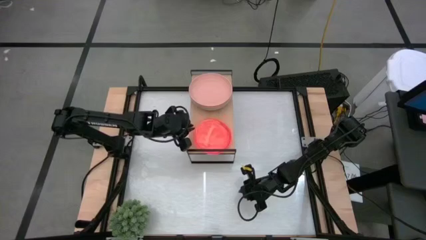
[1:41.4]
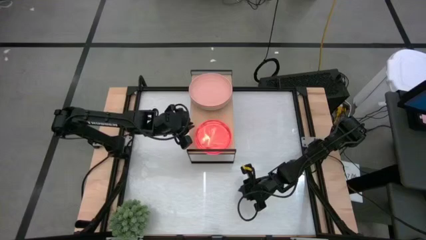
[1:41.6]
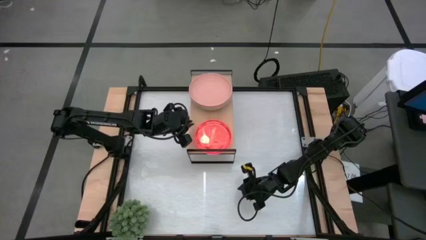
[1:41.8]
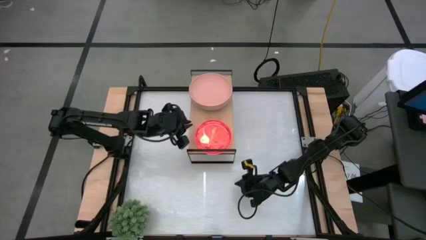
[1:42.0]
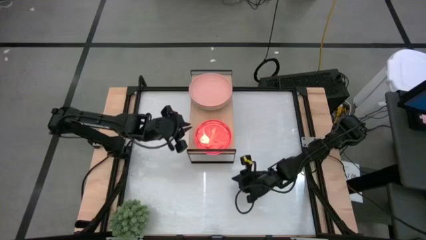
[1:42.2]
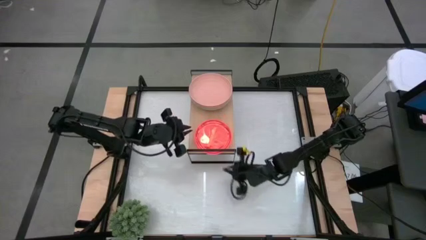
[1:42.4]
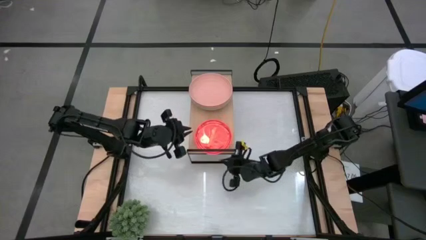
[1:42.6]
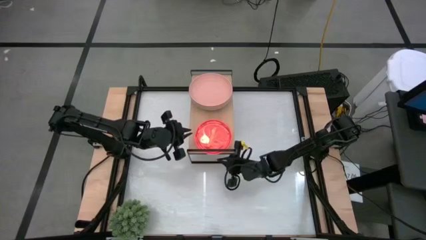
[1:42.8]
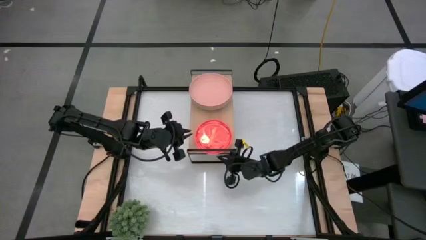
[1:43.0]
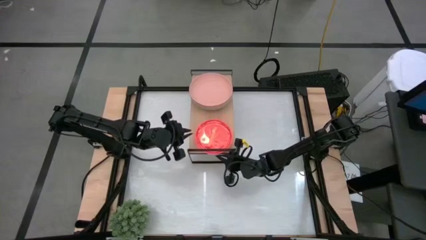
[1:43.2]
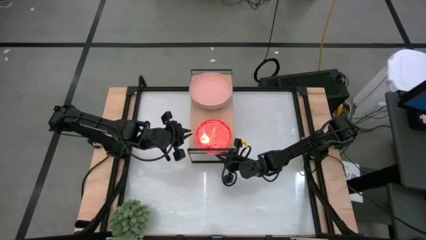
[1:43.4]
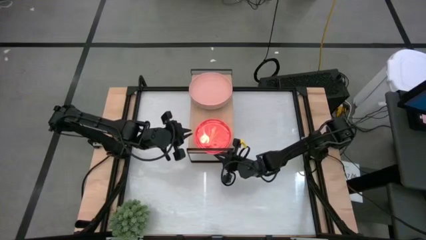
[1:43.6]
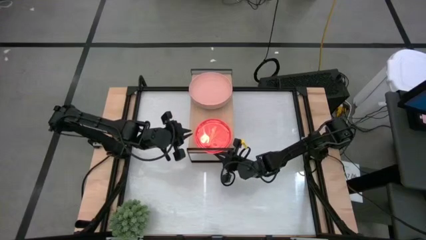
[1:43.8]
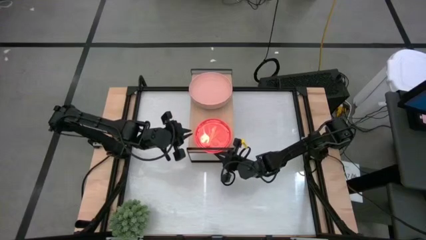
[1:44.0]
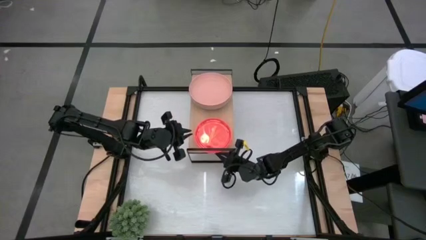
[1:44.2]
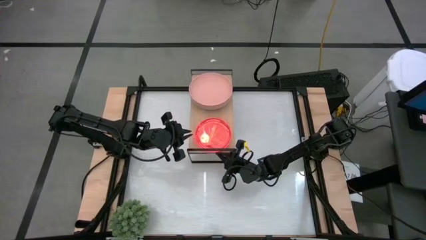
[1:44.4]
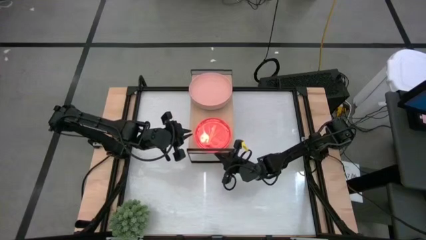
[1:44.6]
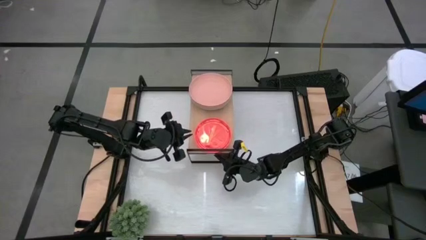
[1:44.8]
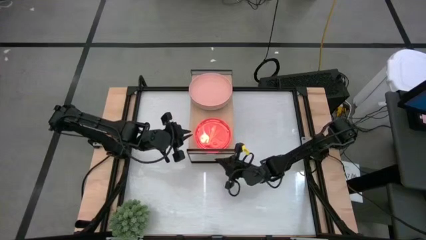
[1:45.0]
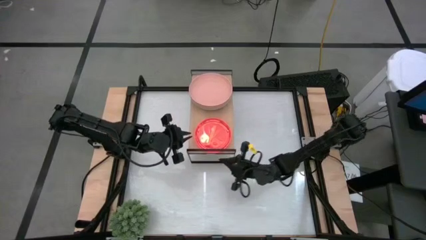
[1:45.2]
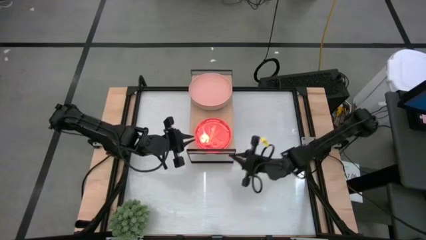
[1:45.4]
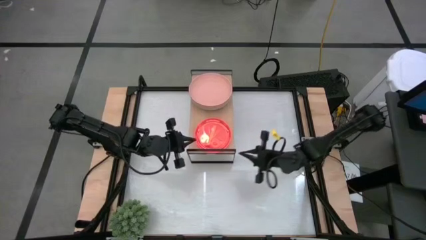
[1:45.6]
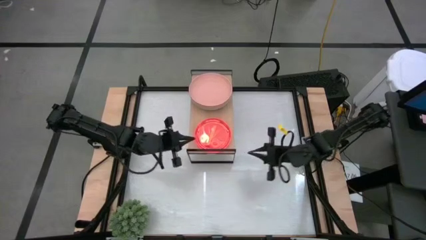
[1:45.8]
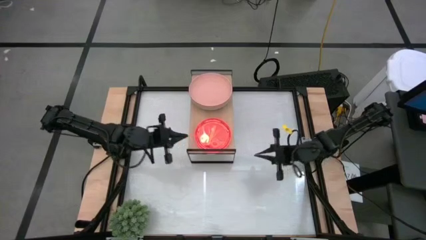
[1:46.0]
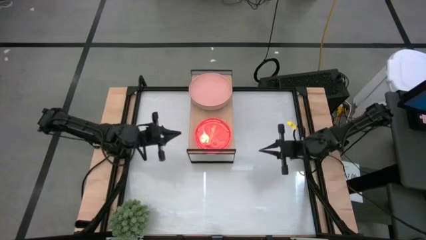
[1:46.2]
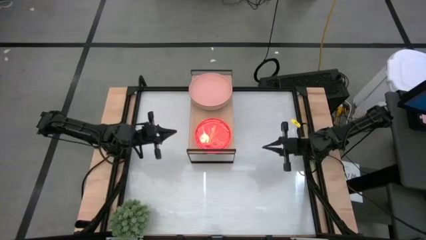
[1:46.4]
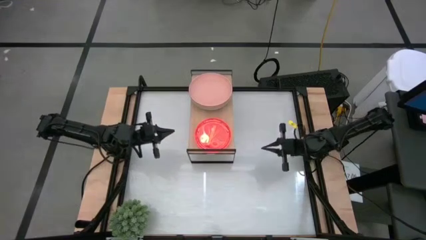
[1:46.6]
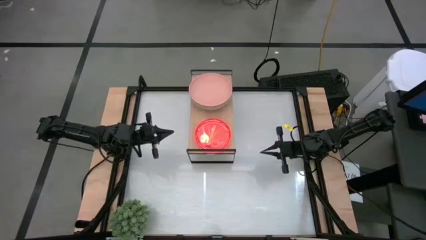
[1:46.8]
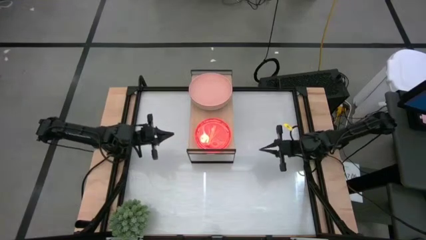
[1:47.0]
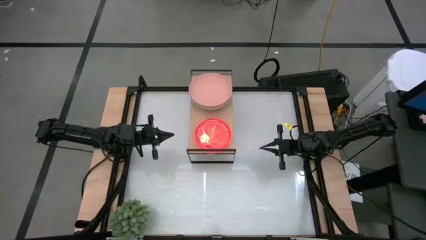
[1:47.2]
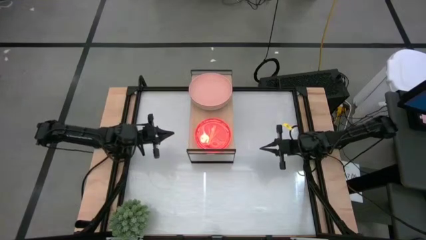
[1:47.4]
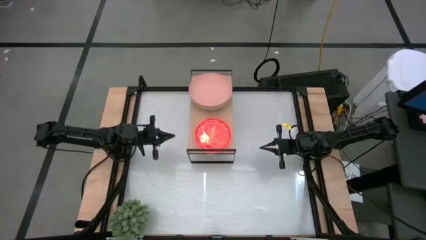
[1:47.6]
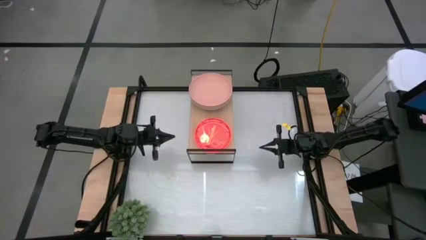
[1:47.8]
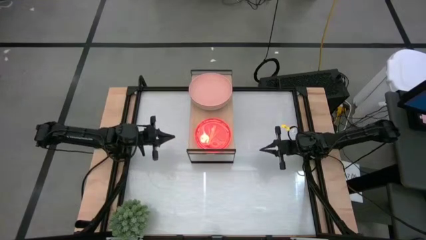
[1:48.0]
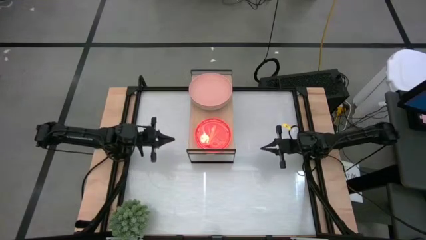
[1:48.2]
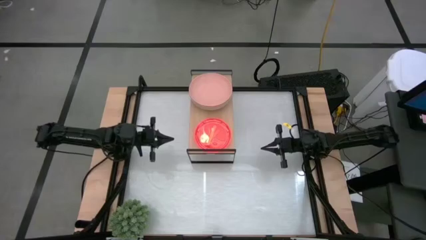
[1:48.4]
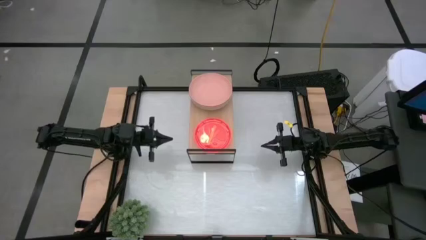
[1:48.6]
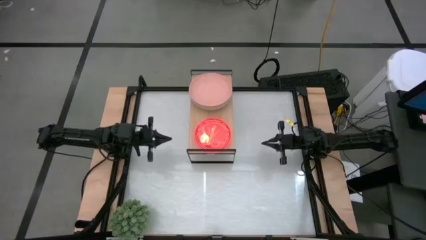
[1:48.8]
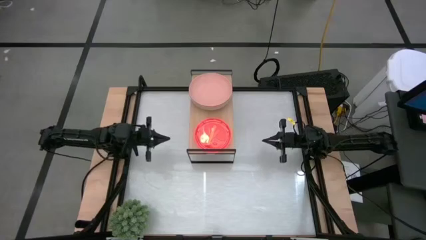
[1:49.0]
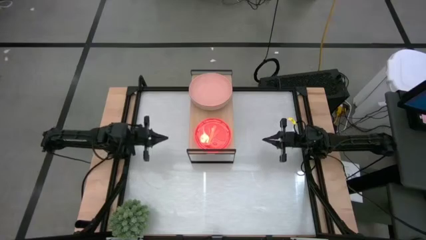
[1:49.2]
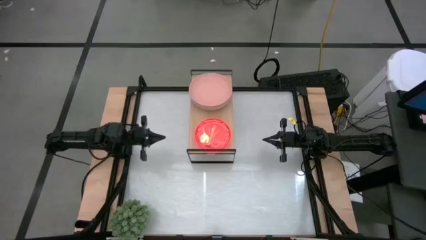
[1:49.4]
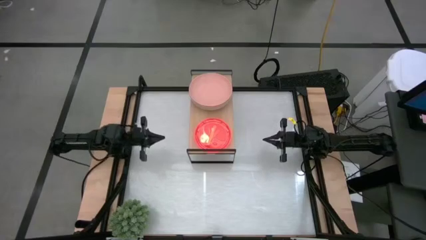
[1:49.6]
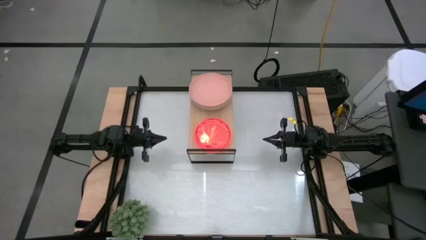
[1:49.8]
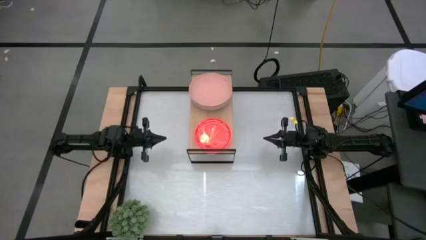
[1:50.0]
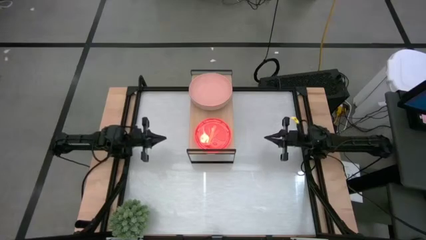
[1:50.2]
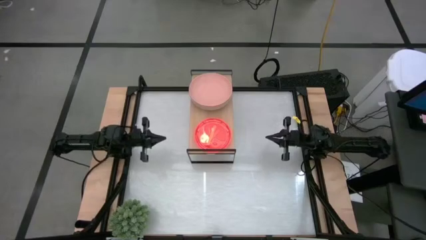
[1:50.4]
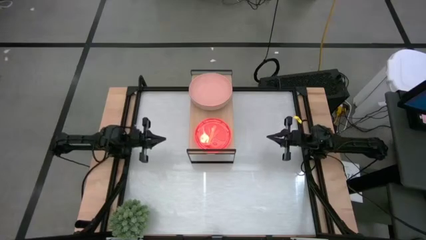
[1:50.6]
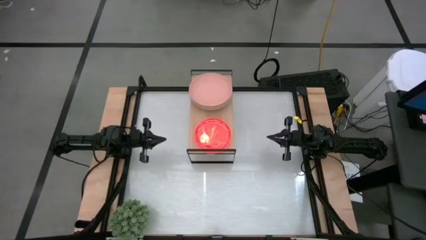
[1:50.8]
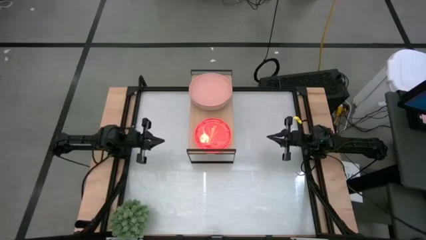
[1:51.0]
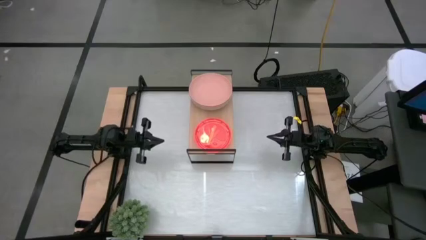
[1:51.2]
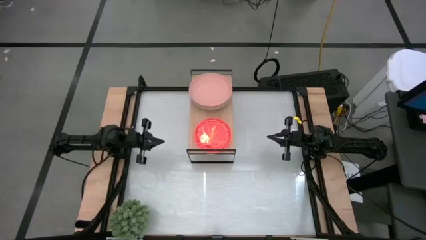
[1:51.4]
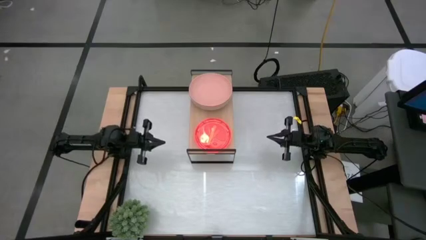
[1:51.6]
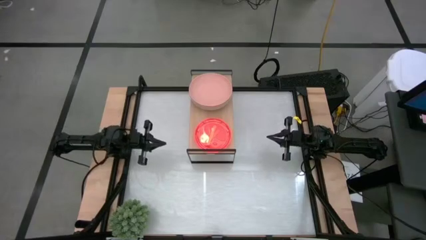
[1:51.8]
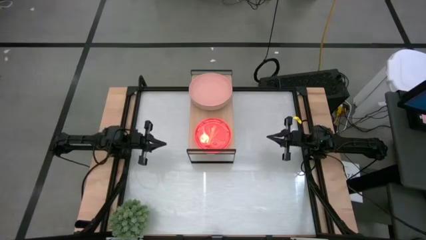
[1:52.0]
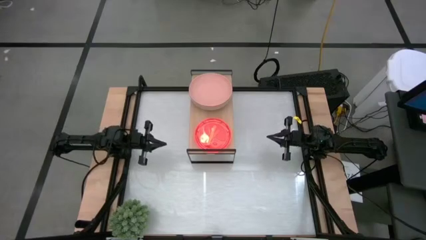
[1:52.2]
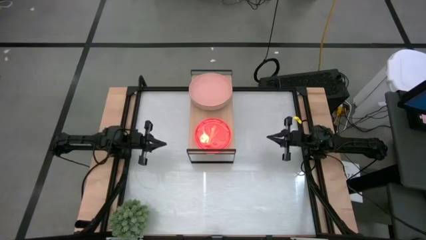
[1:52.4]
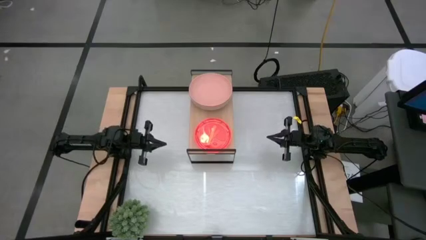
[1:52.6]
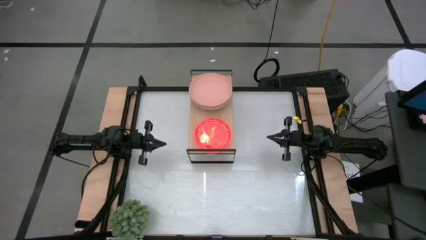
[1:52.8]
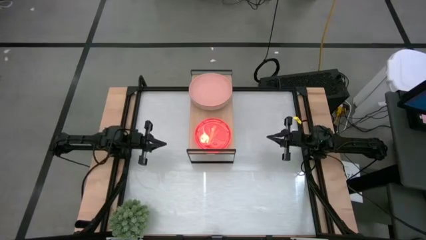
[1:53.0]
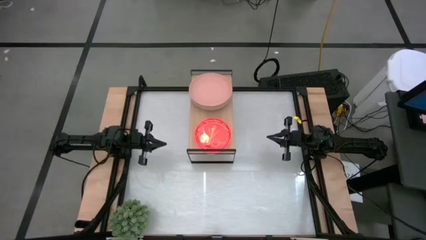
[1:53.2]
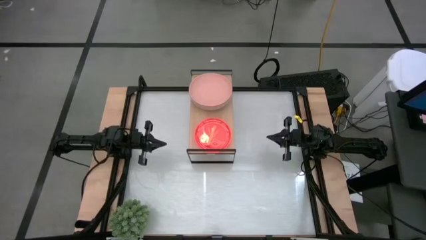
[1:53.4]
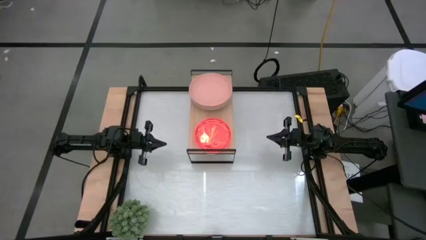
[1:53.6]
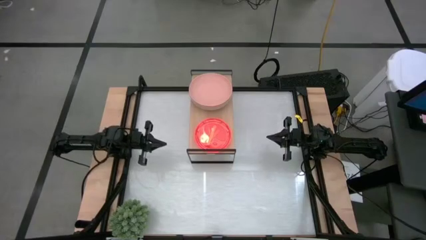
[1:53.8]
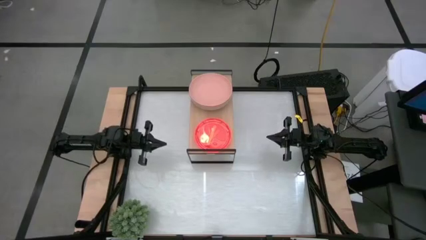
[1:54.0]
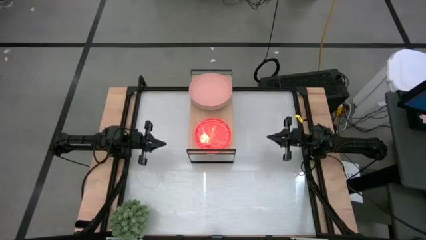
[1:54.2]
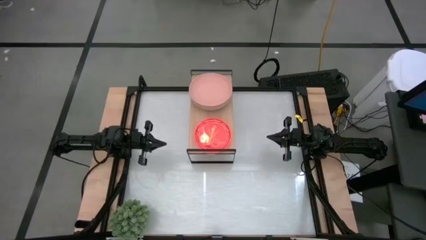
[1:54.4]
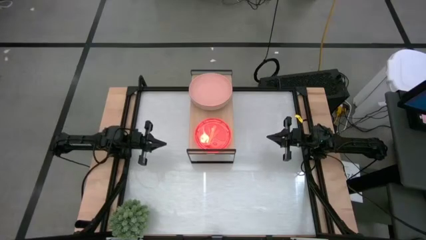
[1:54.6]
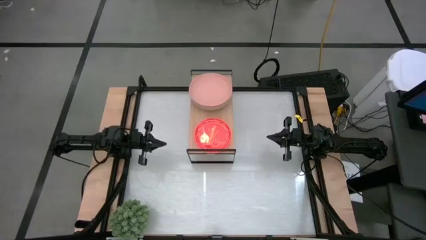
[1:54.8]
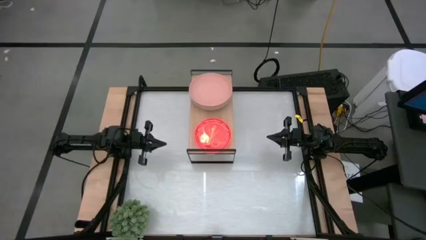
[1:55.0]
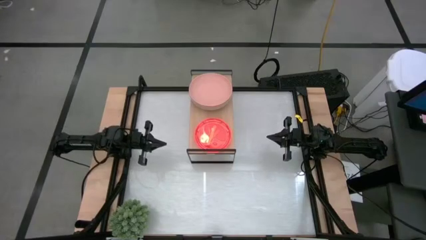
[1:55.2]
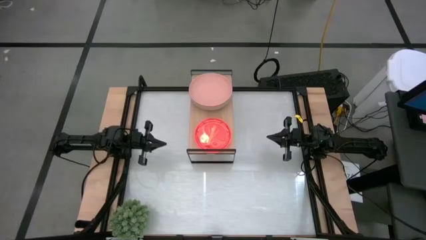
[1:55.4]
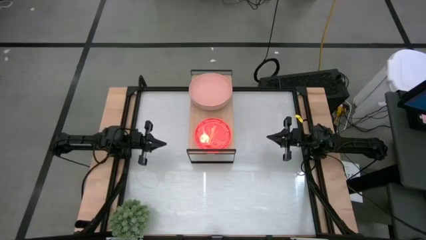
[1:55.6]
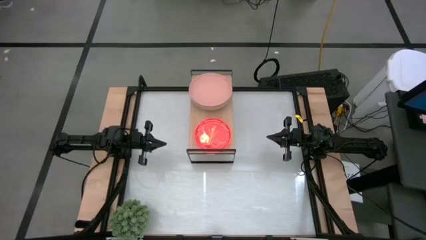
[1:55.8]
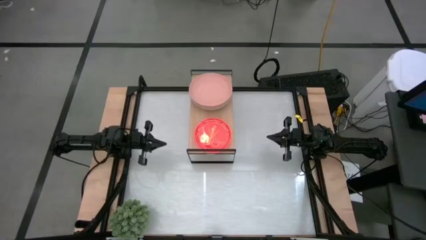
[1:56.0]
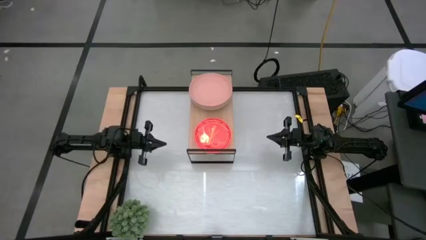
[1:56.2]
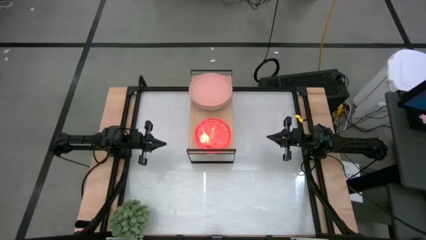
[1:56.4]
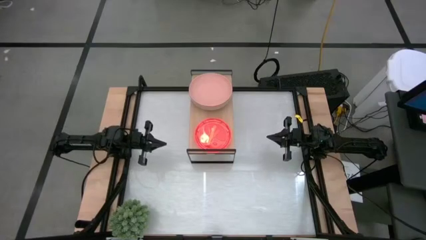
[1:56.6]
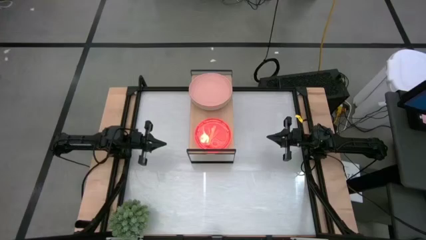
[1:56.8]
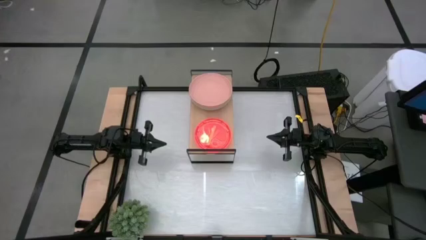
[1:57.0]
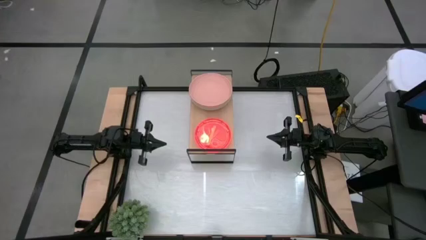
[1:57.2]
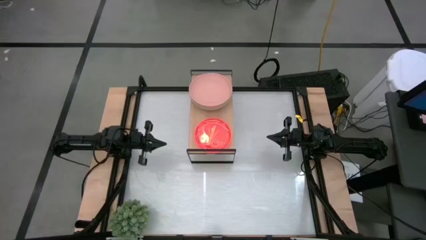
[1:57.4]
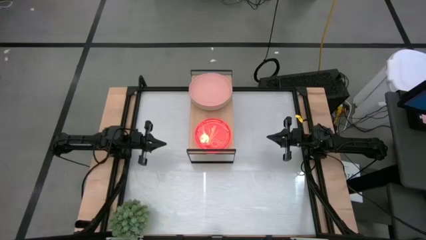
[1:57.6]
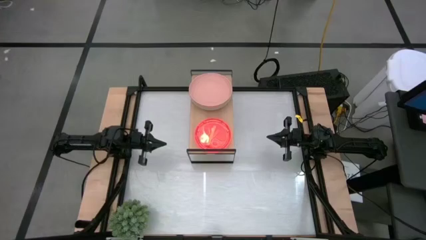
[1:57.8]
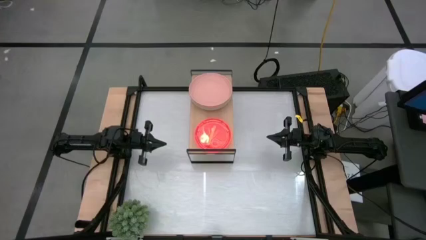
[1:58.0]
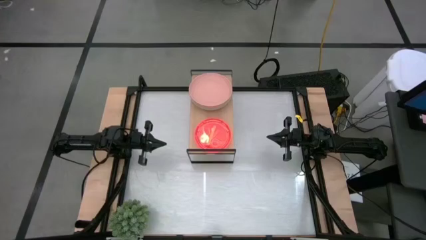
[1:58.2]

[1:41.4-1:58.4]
Task: Place and stack plates onto a shelf
Return to Home Position
